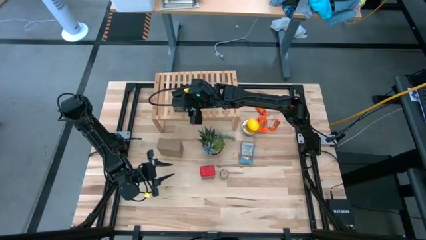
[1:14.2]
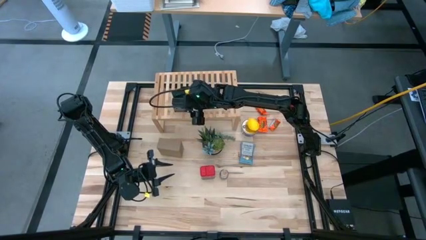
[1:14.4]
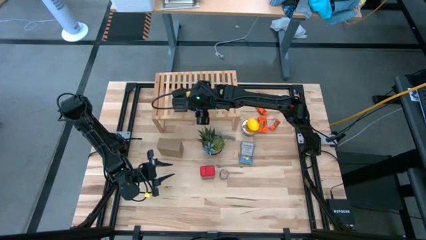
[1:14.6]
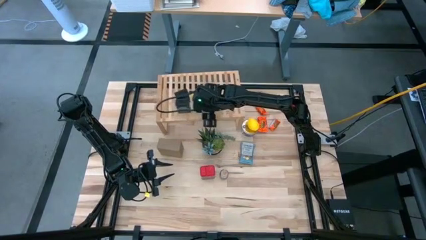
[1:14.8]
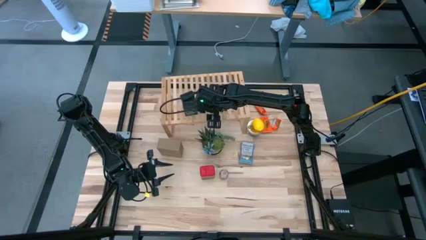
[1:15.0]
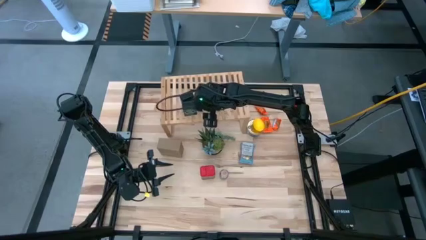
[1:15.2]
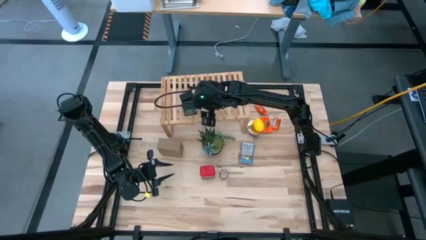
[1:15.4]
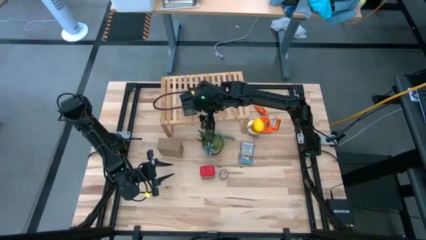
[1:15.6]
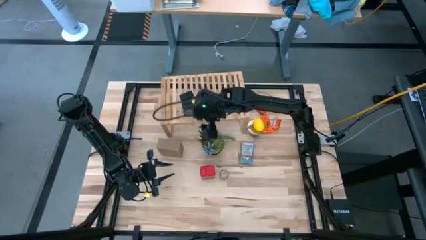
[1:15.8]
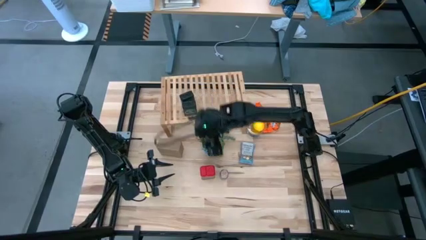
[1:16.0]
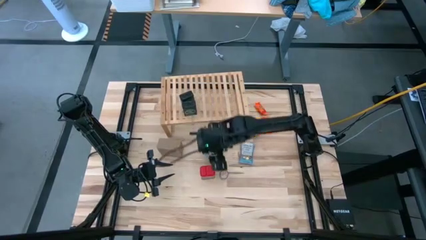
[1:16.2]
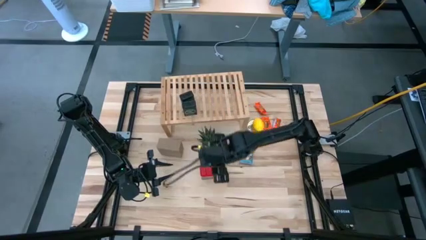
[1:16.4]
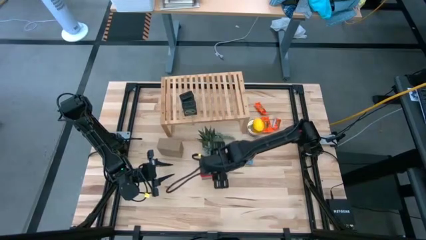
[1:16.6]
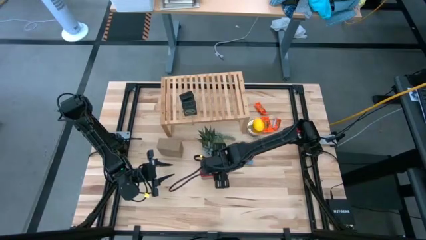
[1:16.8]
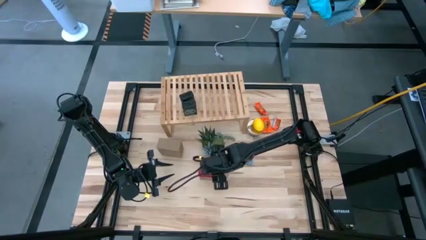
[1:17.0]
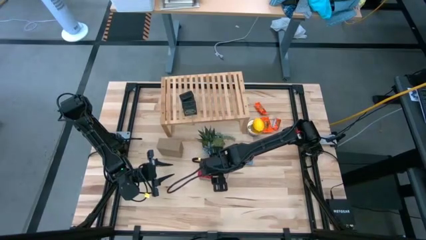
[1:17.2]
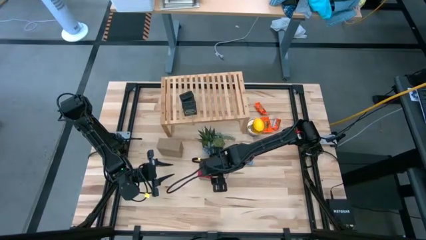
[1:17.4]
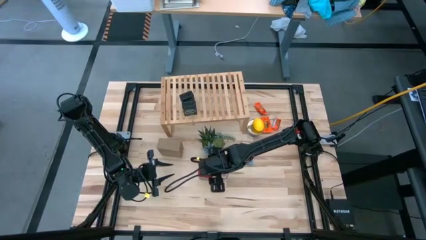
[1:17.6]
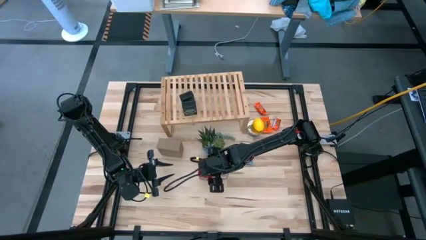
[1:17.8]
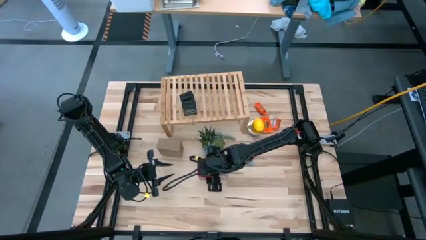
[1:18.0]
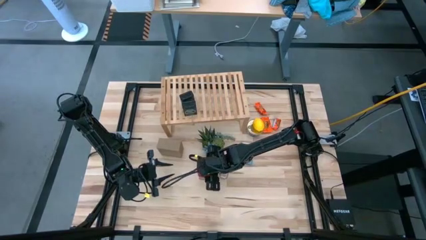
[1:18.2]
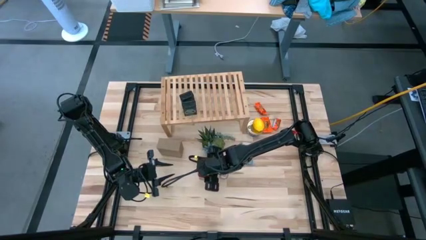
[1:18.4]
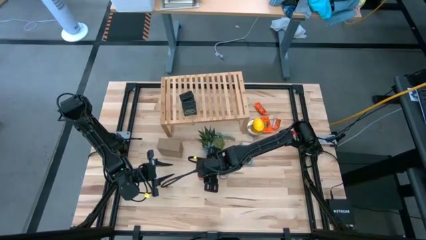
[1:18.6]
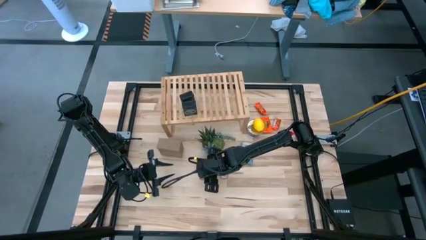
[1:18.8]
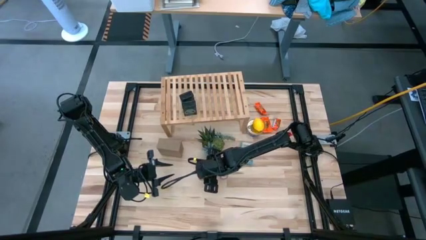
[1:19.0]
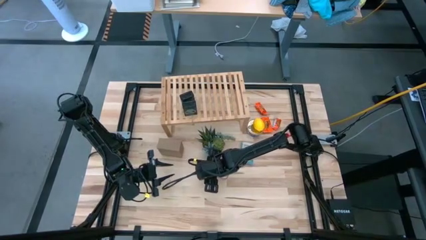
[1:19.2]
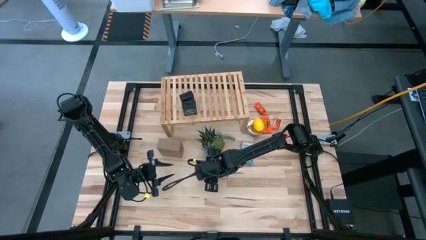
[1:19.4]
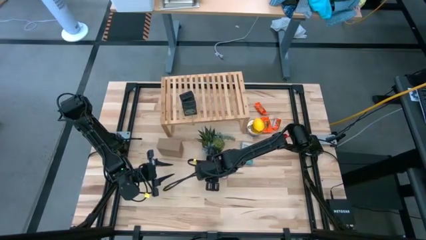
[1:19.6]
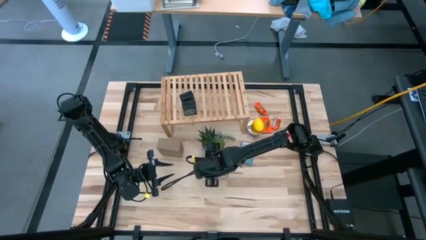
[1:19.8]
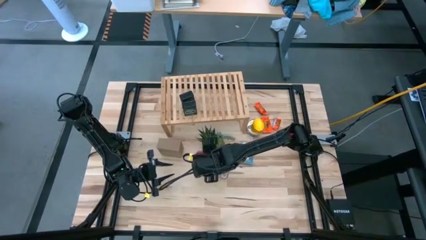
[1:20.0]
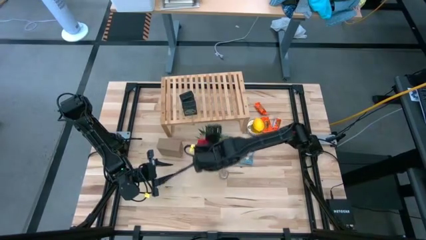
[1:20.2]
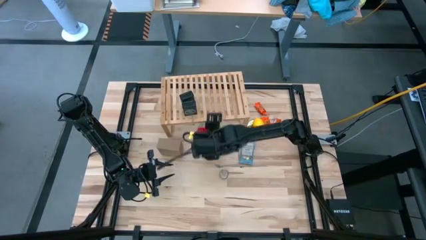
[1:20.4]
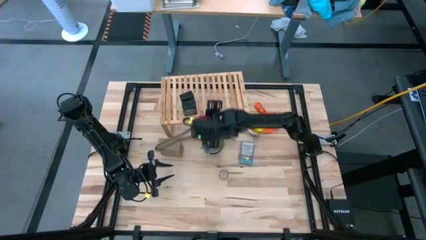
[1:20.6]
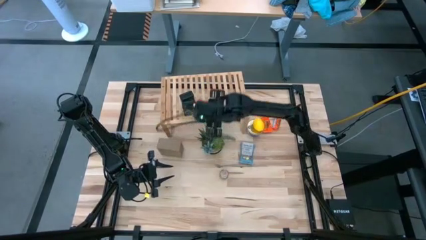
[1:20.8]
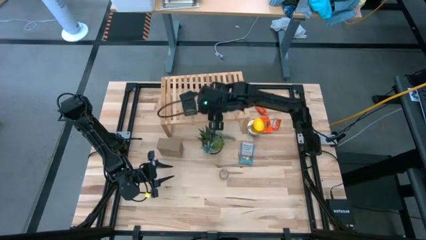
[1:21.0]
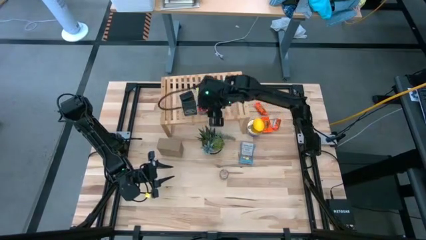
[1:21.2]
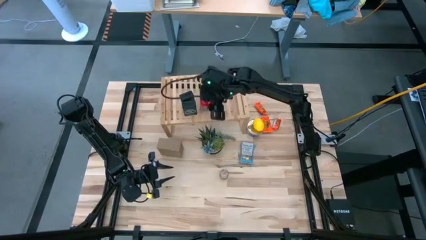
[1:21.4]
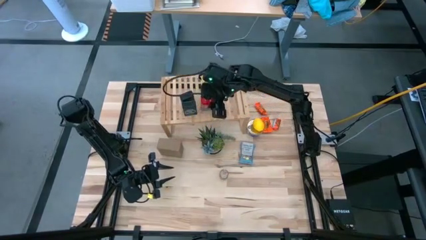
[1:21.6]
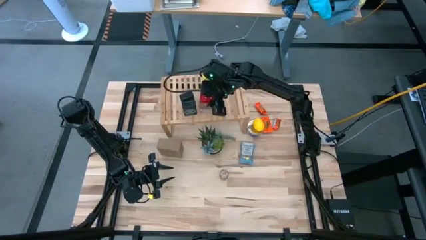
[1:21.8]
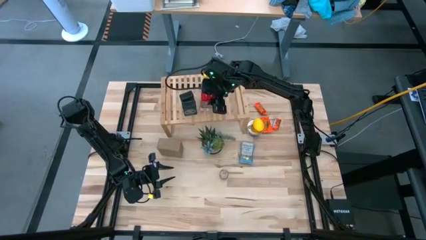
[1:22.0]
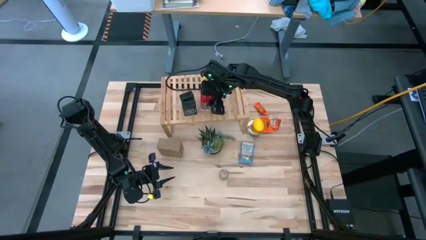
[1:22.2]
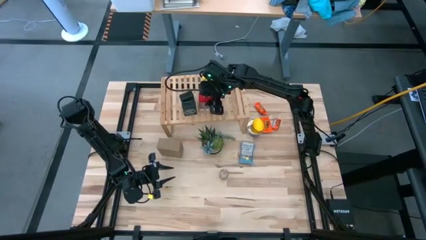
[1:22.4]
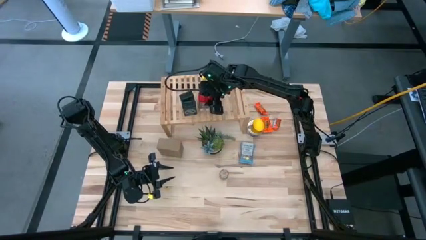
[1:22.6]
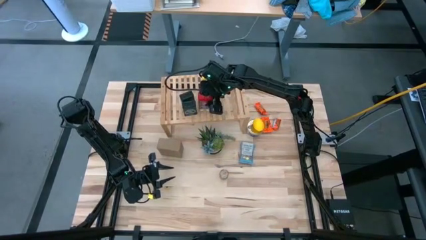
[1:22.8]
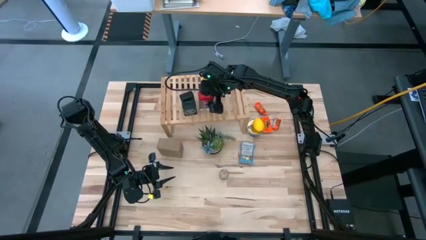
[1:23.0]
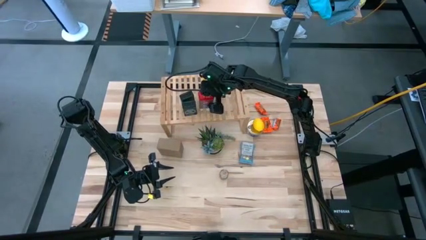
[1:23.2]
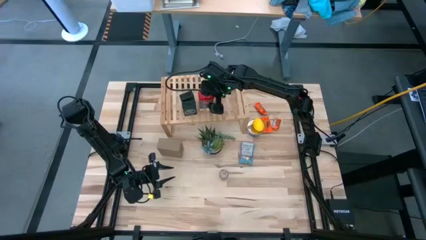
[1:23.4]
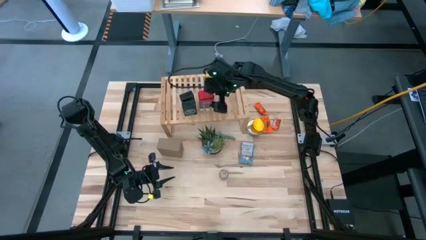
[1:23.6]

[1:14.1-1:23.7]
Task: Shelf spices
Put the red seasoning can on the shelf

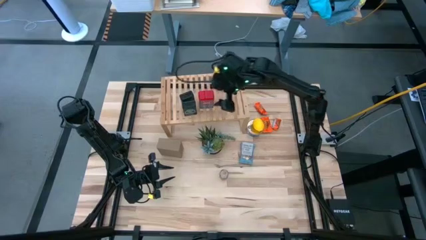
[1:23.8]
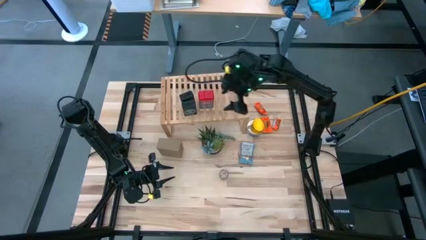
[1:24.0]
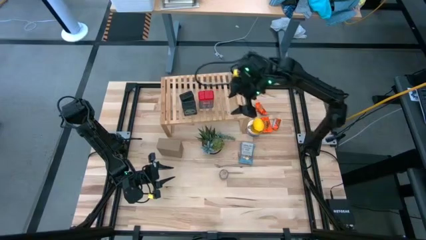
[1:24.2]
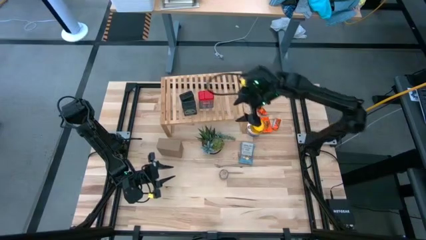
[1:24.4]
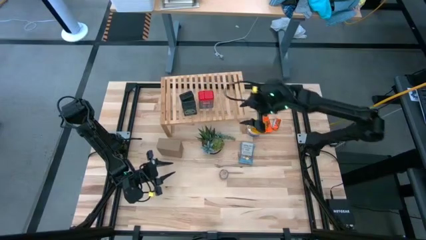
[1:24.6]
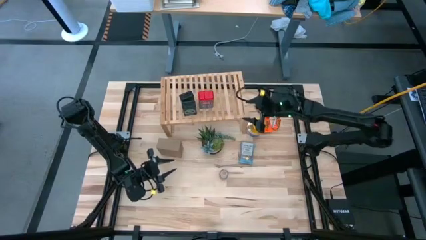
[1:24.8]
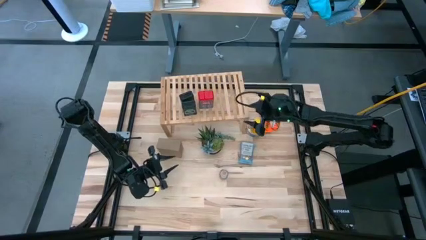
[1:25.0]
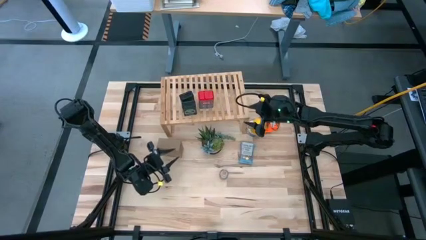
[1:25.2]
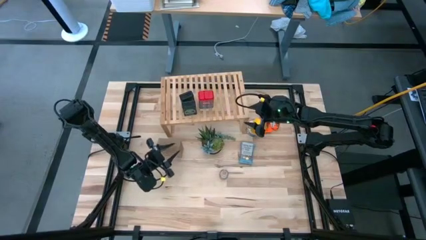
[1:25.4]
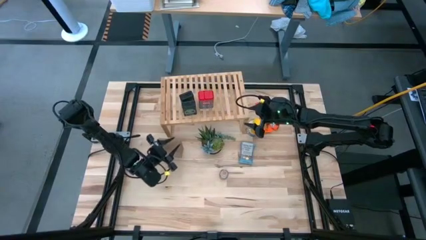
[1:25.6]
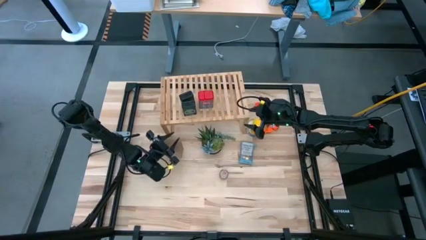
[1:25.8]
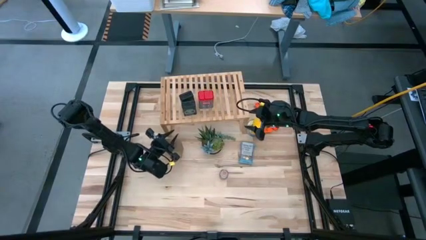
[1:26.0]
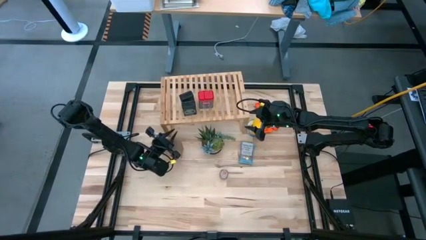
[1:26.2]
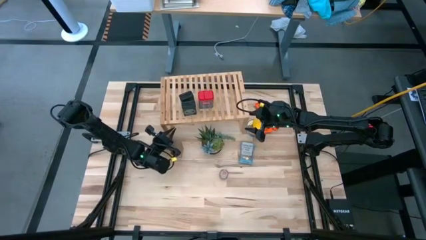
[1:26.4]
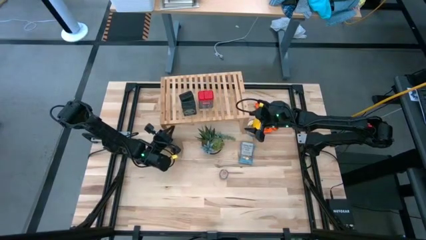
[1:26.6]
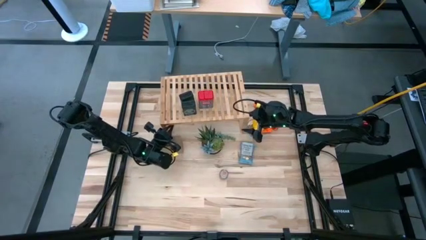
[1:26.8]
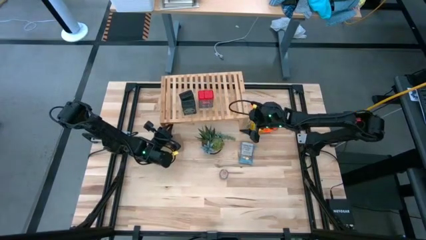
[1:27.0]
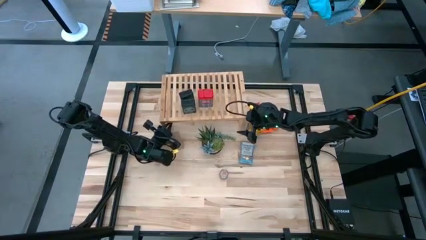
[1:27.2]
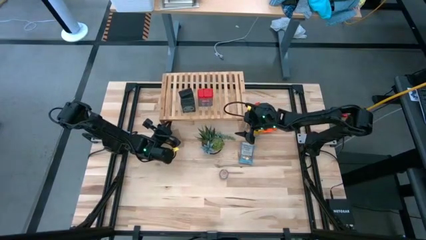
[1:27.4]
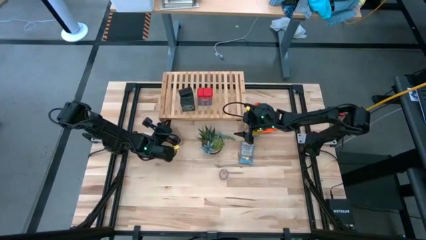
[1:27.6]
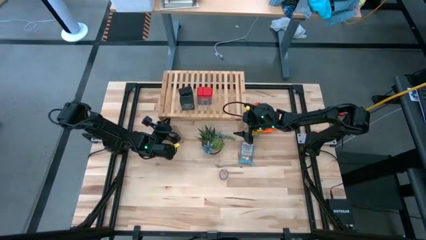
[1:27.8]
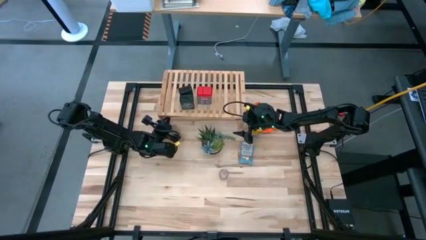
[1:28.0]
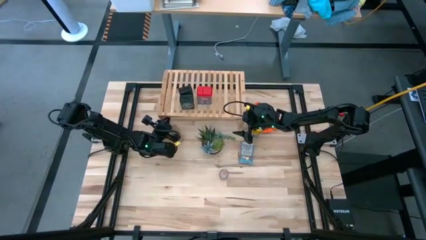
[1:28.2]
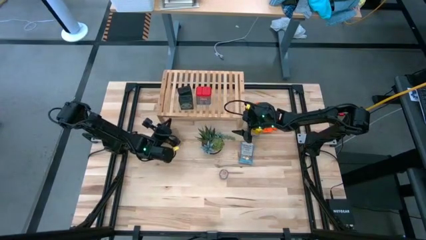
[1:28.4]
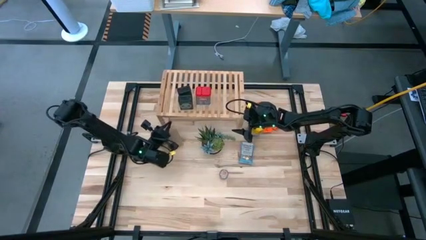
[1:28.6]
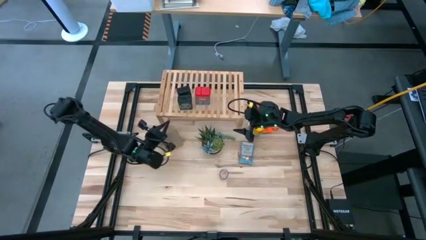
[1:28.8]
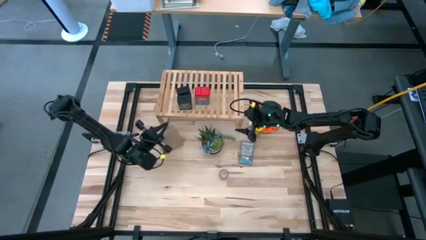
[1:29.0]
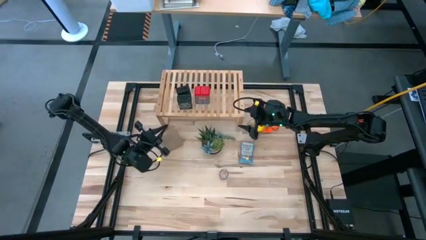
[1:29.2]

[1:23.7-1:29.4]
Adjust the shelf
